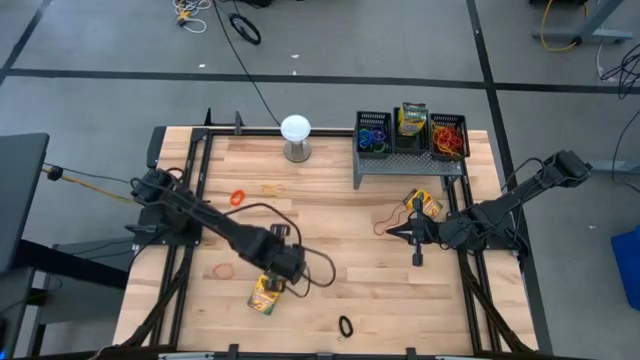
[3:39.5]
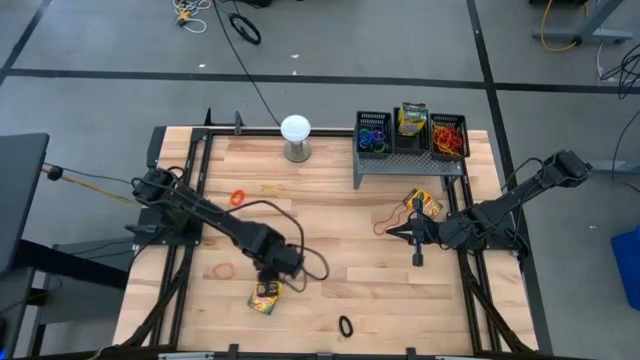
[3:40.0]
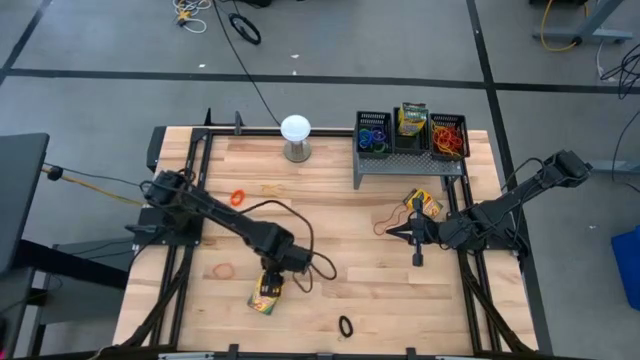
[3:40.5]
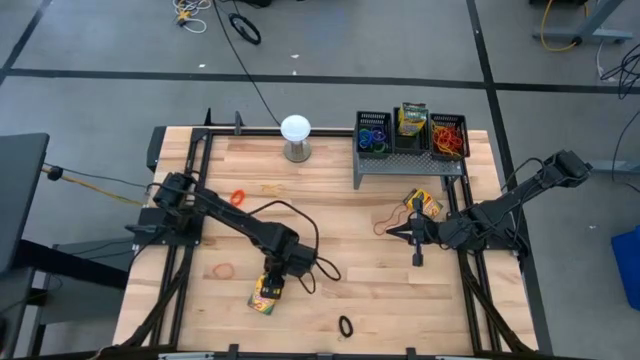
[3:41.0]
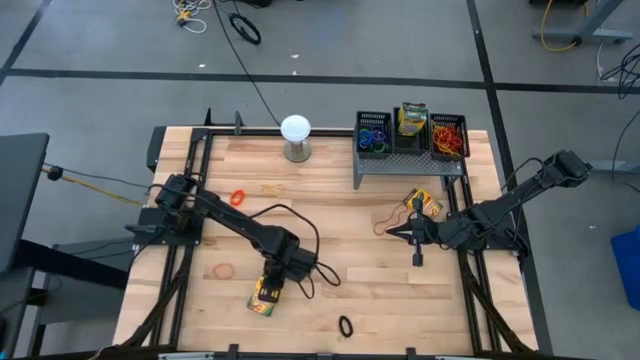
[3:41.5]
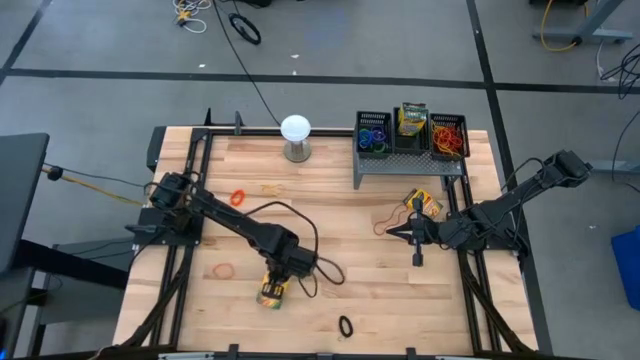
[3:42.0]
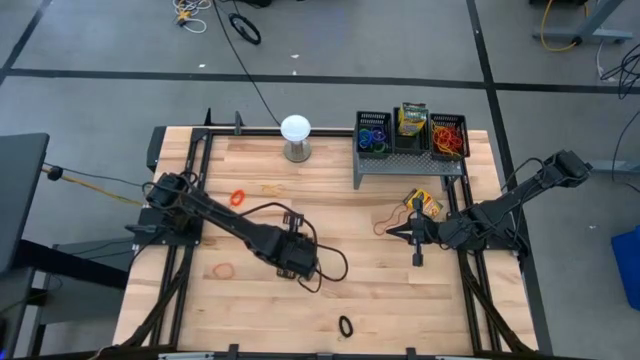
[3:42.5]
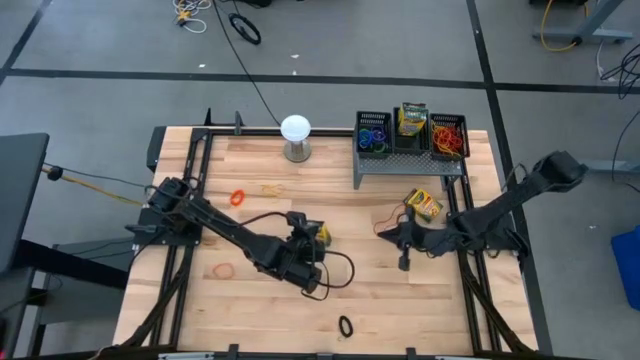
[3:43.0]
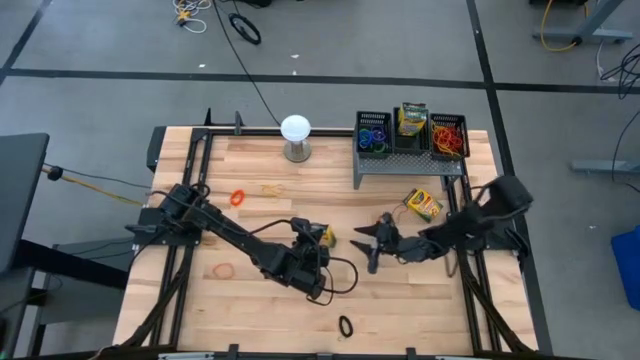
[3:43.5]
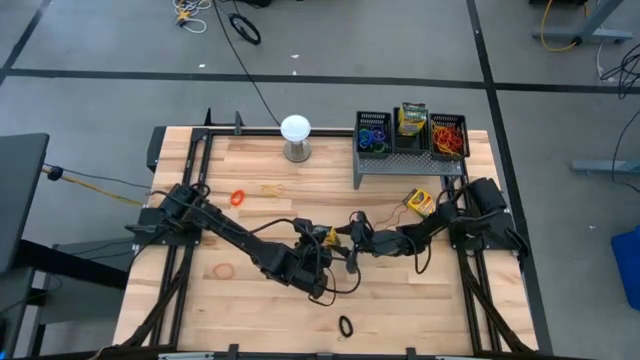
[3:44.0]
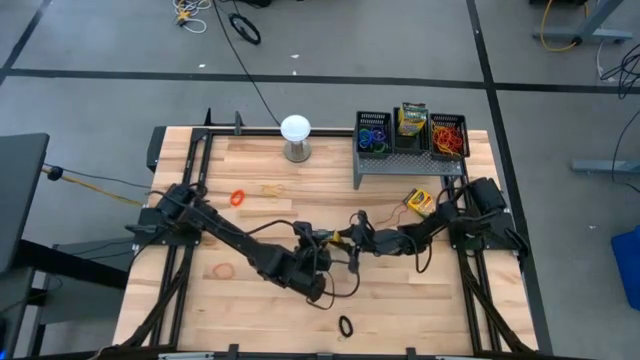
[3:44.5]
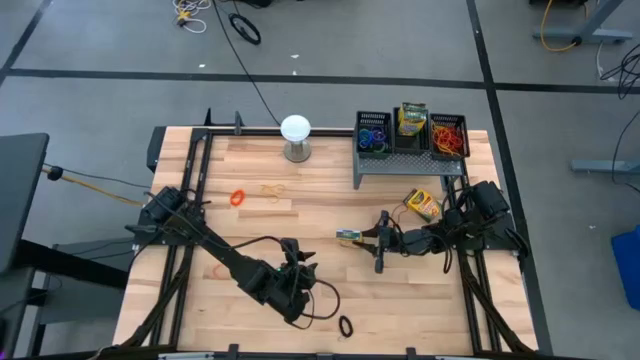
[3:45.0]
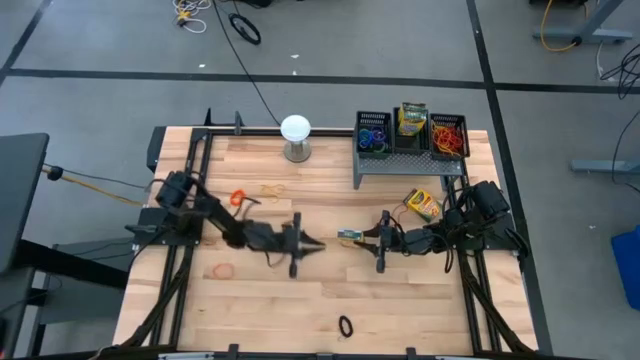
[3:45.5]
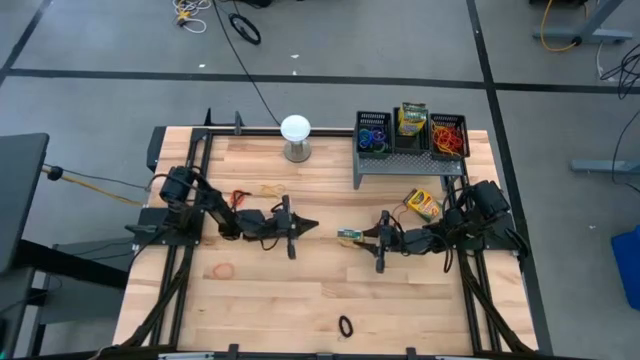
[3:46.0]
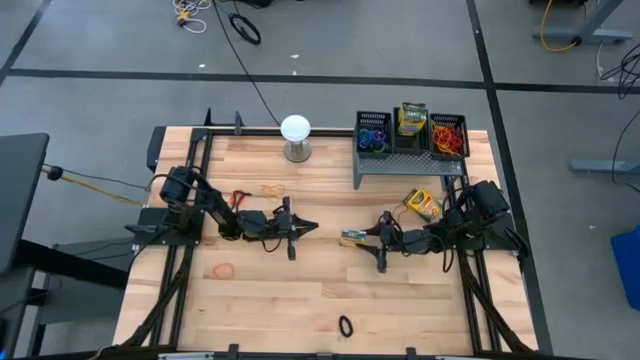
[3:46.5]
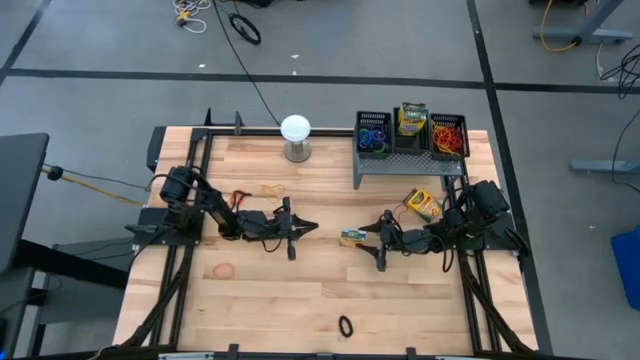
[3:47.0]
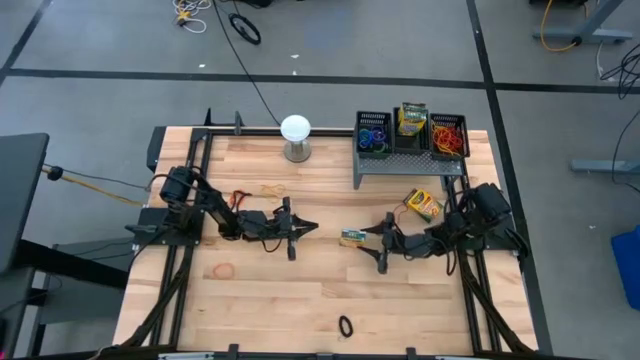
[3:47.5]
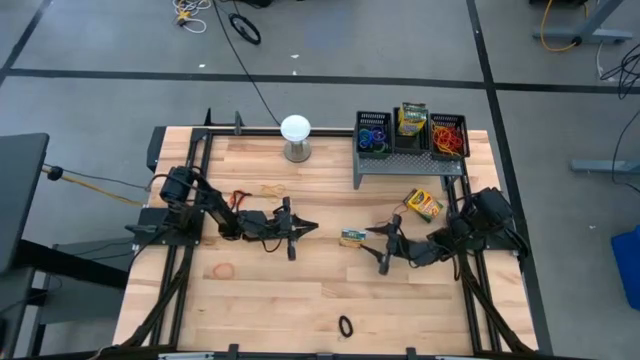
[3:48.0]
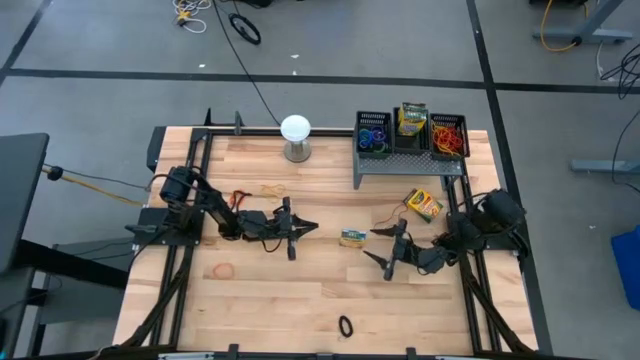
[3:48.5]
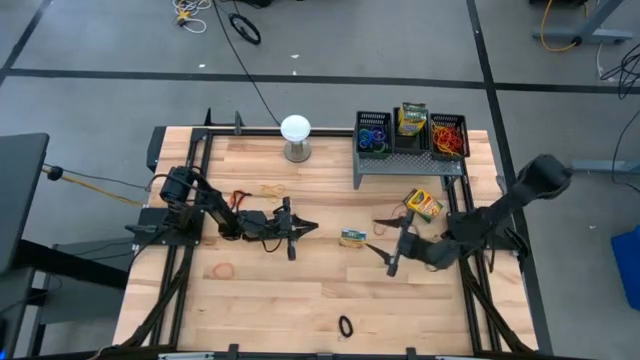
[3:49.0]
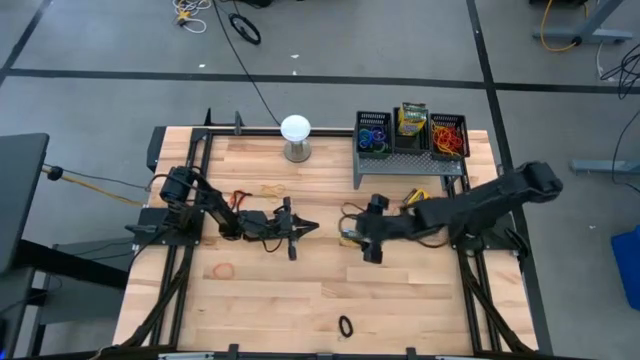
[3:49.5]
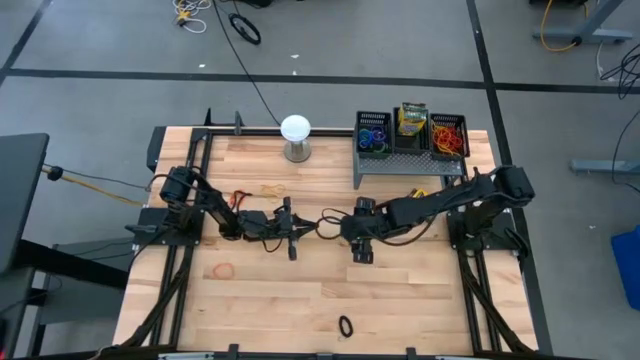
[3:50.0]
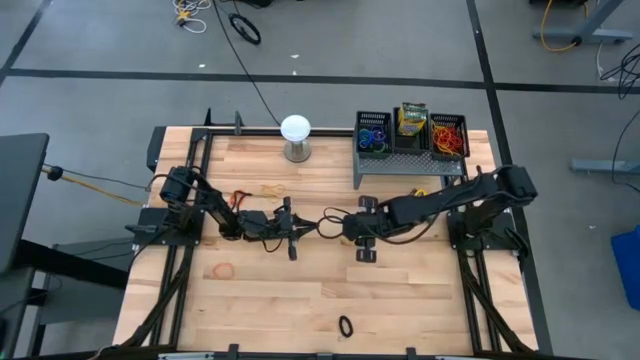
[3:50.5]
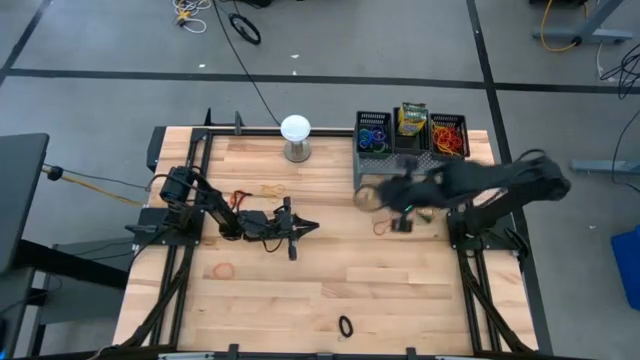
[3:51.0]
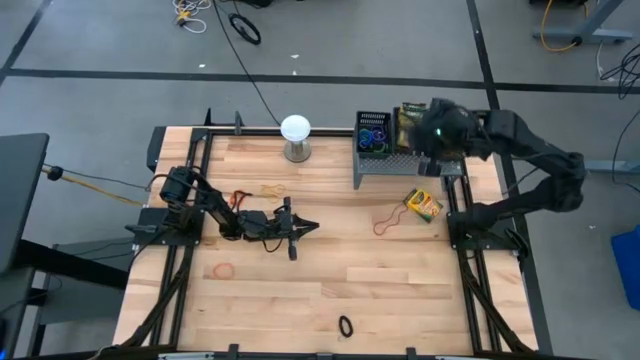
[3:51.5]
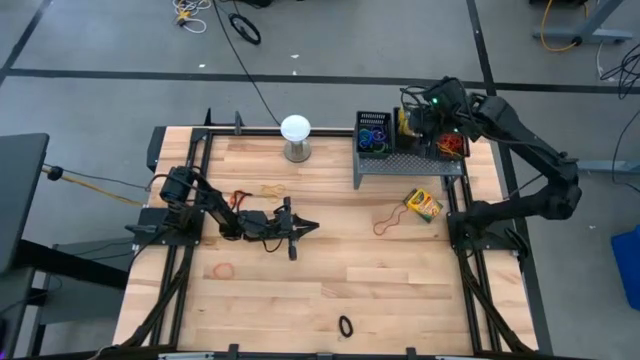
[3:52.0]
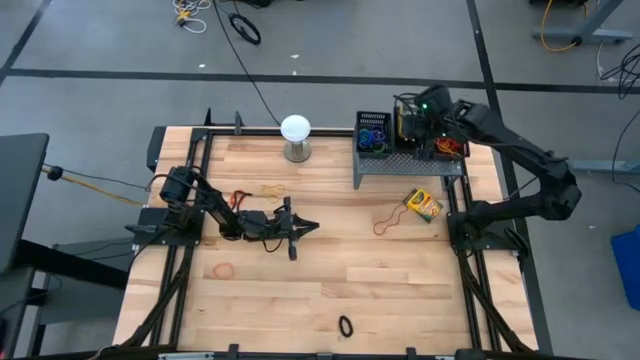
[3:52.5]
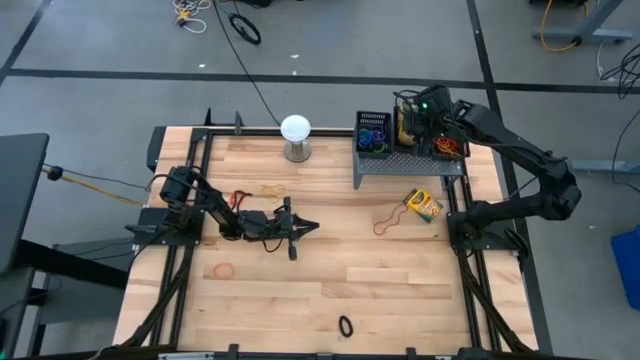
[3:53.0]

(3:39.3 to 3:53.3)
Task: Pick & Place Office Desk Supplies
Put the yellow crayon box into the middle black basket on the shelf

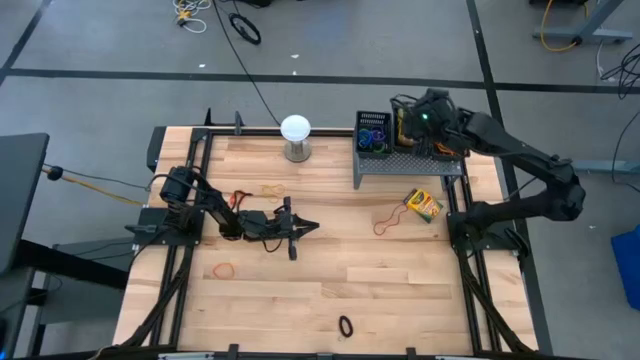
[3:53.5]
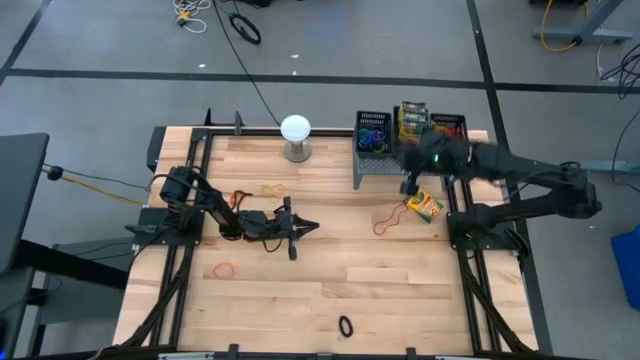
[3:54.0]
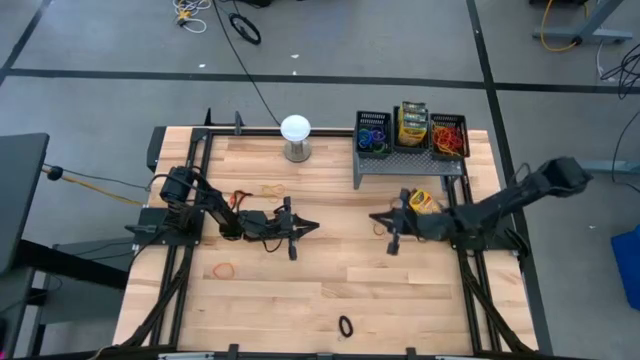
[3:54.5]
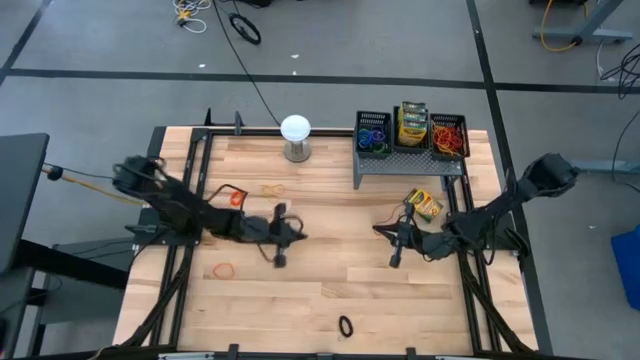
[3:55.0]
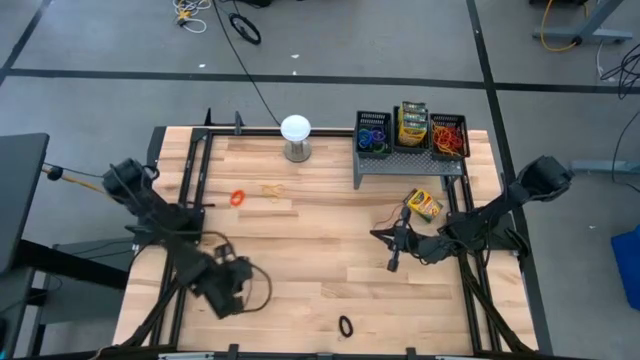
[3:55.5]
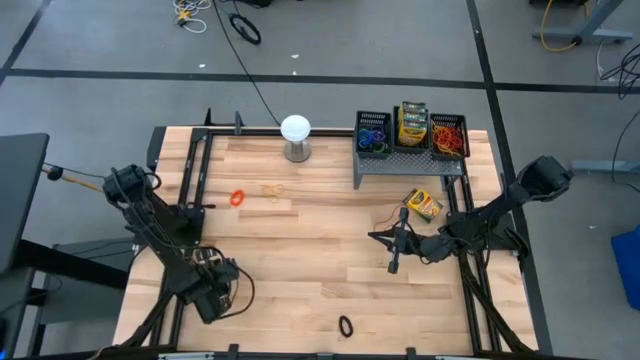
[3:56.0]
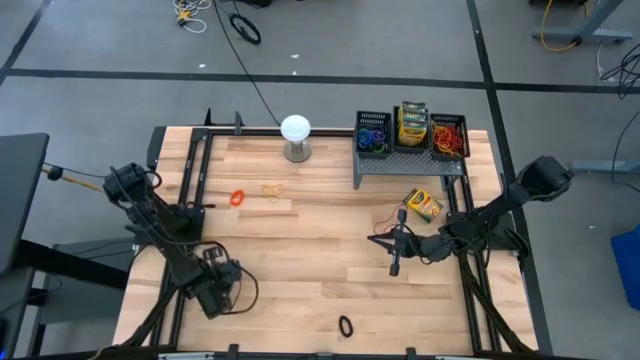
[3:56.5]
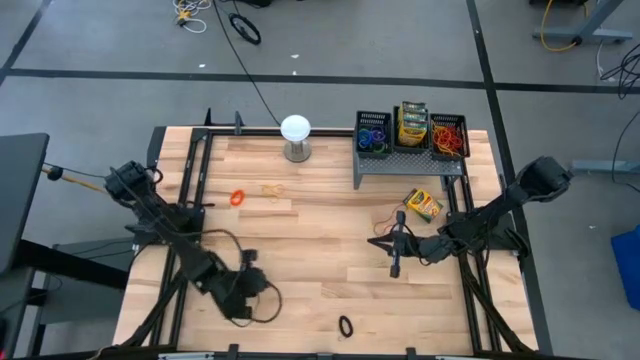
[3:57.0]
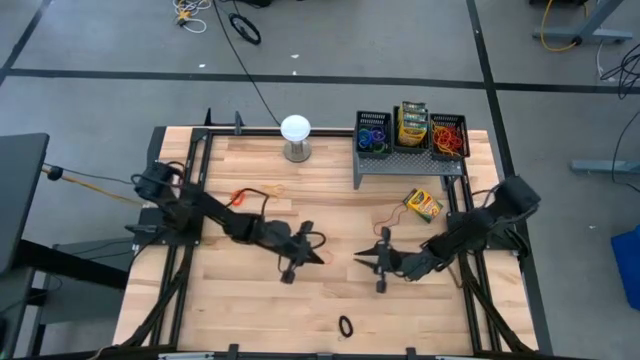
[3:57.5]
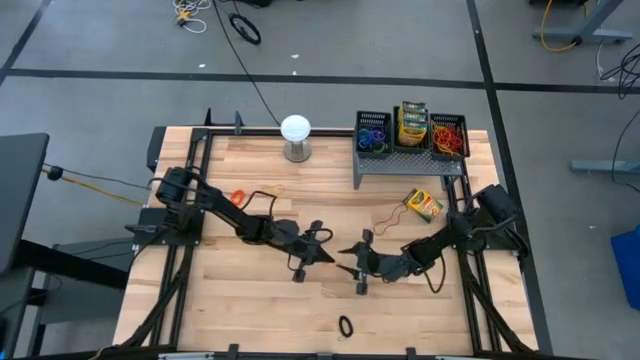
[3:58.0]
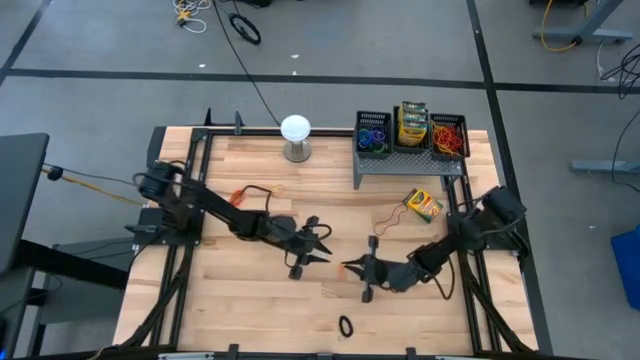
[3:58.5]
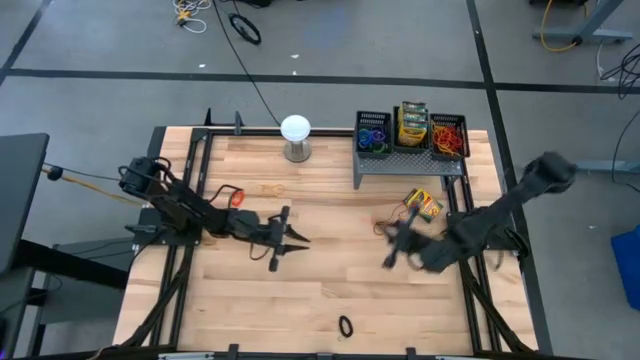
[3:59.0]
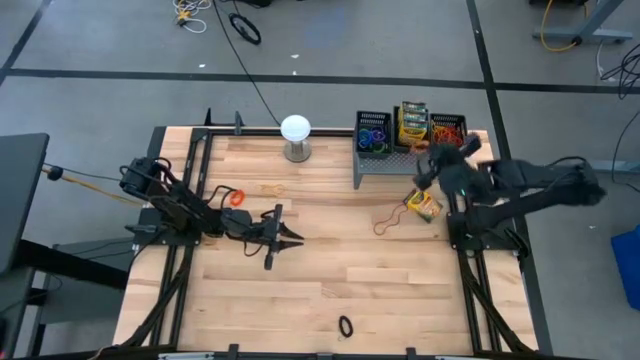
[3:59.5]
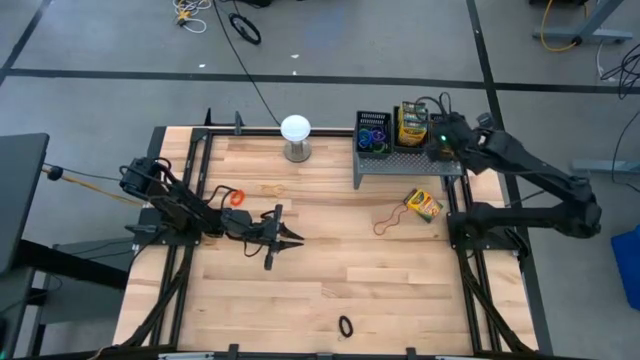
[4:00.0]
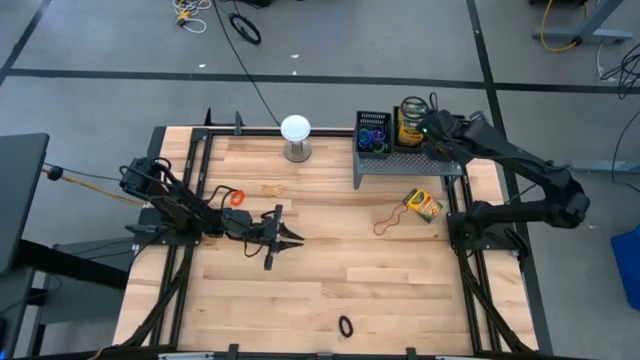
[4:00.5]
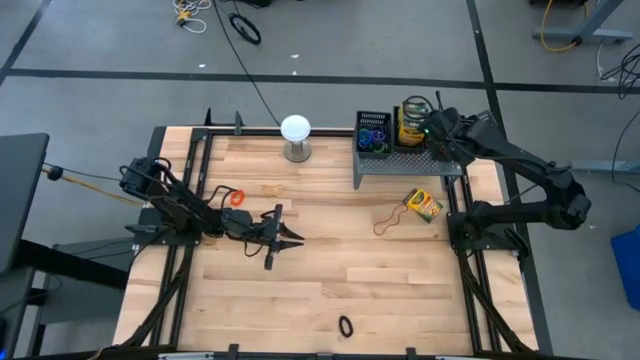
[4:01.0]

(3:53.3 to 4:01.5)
Put the orange rubberband into the right black basket on the shelf
